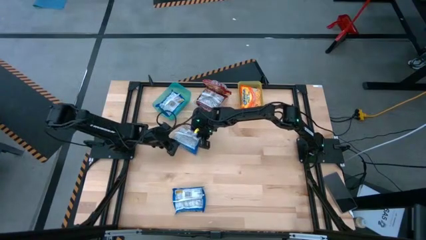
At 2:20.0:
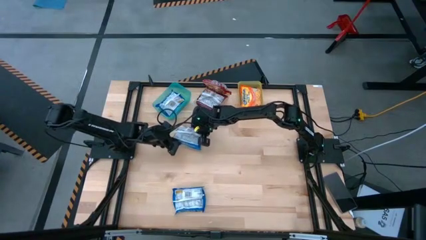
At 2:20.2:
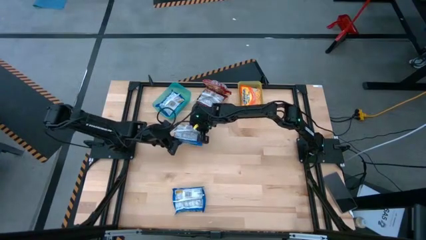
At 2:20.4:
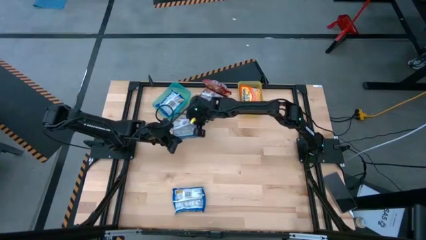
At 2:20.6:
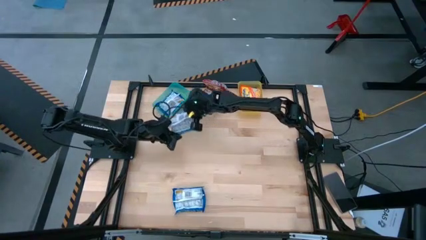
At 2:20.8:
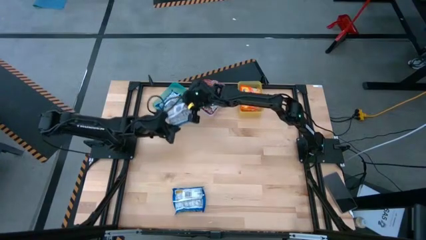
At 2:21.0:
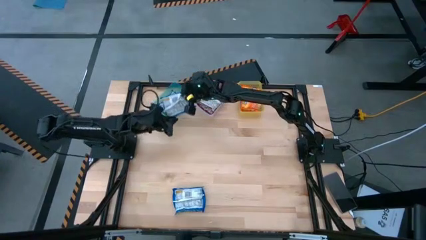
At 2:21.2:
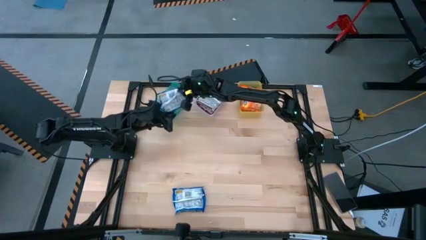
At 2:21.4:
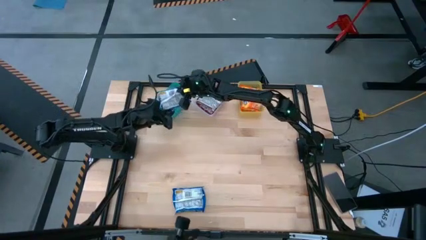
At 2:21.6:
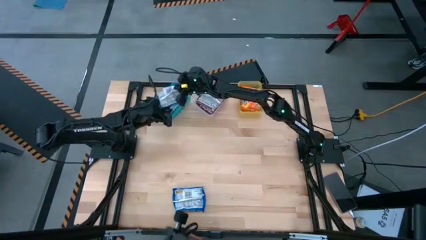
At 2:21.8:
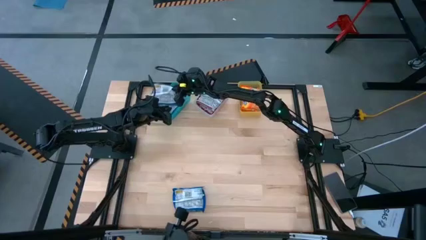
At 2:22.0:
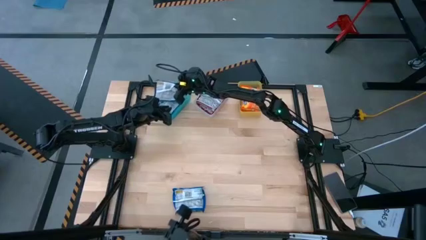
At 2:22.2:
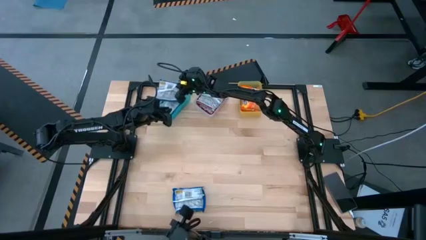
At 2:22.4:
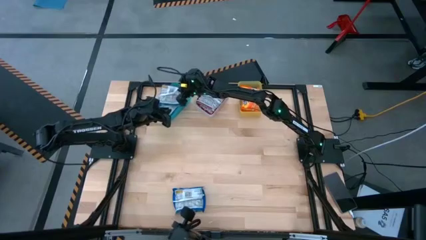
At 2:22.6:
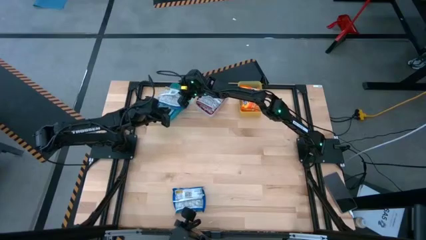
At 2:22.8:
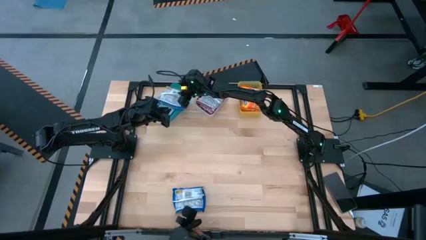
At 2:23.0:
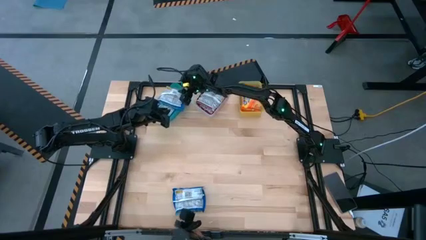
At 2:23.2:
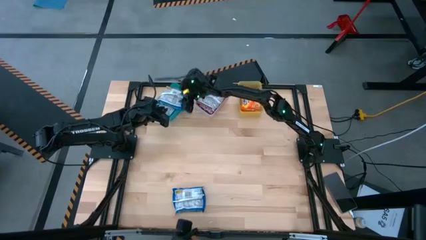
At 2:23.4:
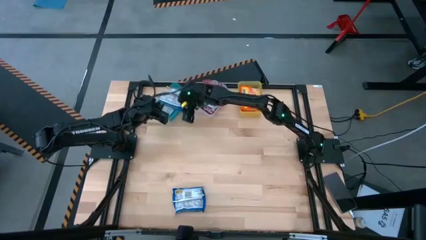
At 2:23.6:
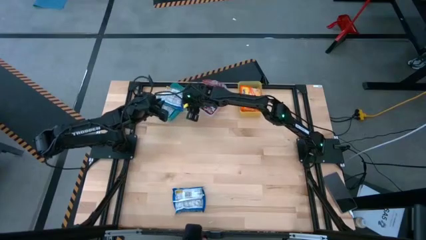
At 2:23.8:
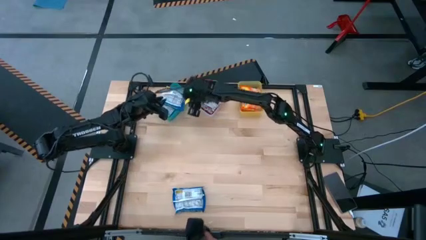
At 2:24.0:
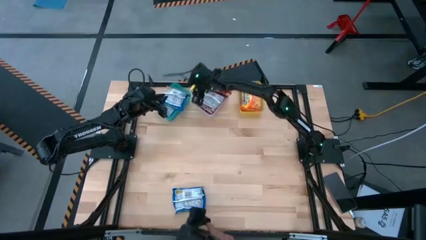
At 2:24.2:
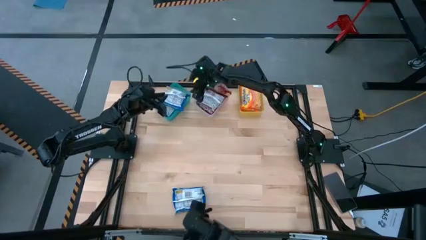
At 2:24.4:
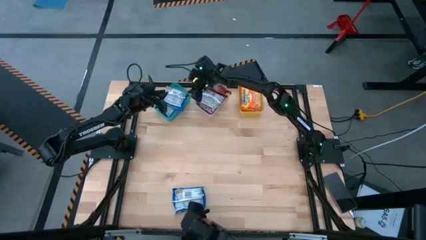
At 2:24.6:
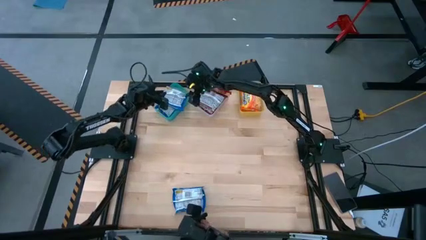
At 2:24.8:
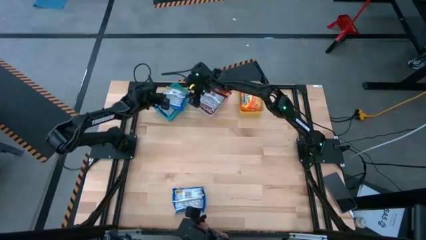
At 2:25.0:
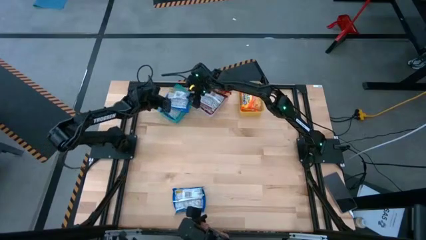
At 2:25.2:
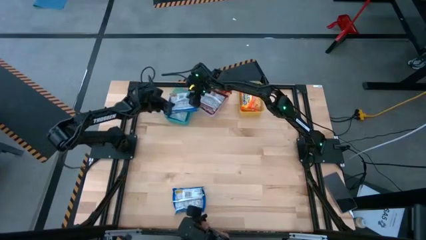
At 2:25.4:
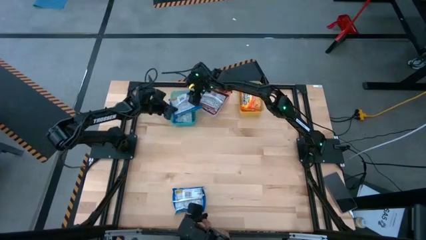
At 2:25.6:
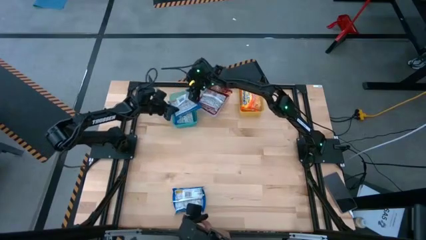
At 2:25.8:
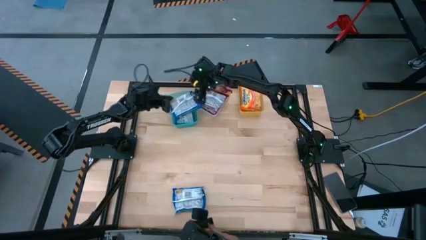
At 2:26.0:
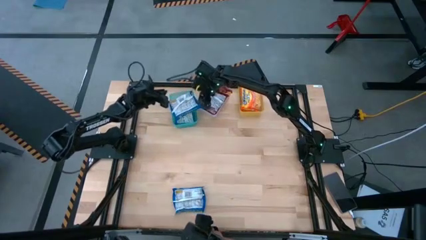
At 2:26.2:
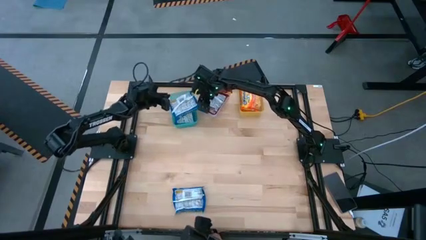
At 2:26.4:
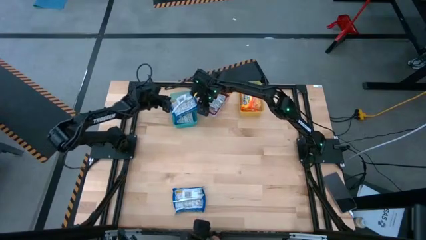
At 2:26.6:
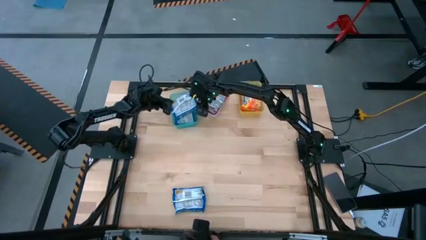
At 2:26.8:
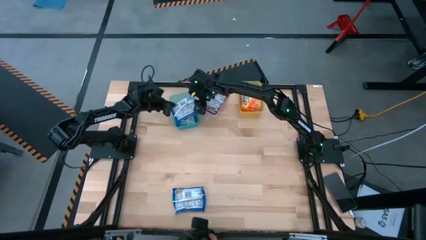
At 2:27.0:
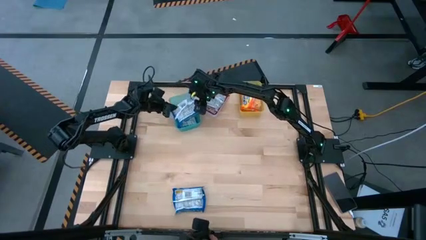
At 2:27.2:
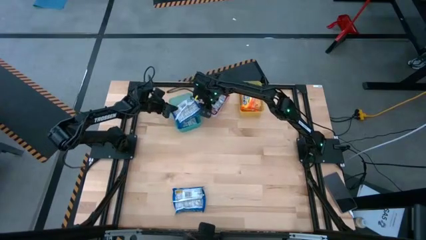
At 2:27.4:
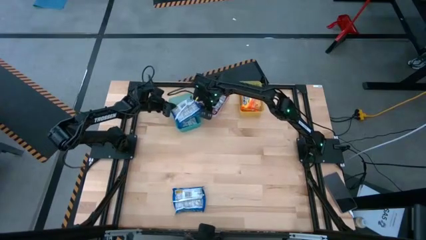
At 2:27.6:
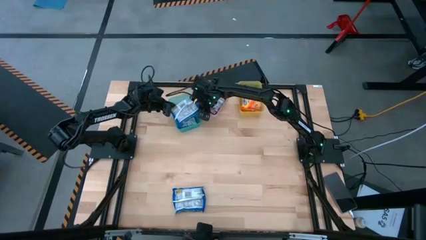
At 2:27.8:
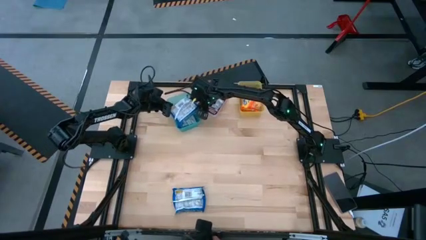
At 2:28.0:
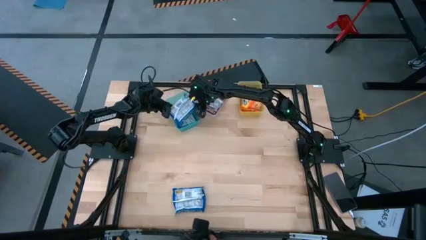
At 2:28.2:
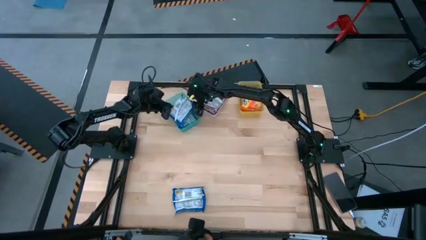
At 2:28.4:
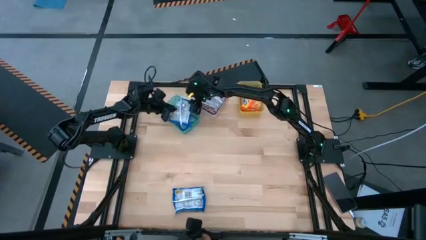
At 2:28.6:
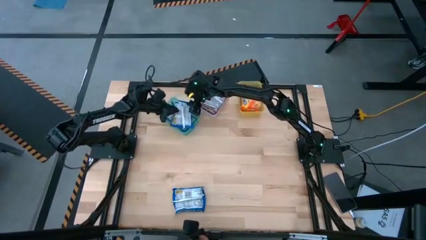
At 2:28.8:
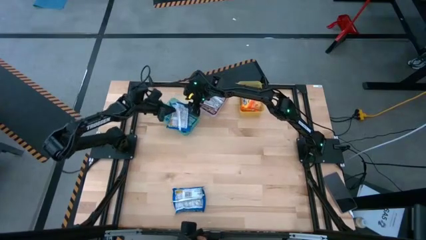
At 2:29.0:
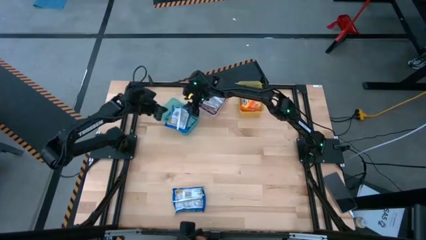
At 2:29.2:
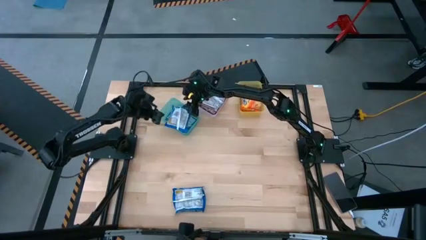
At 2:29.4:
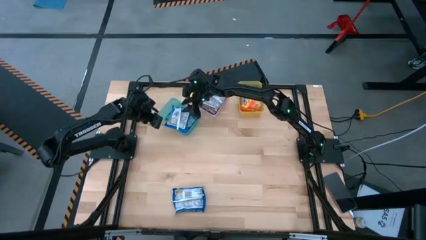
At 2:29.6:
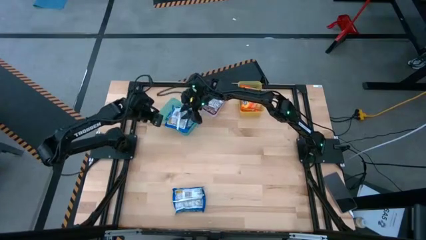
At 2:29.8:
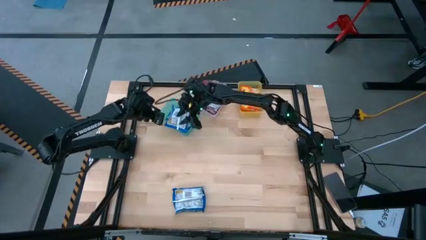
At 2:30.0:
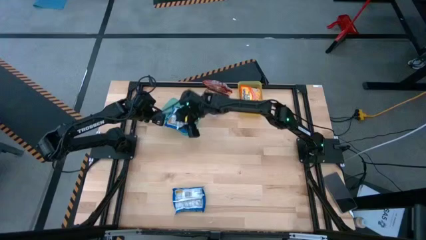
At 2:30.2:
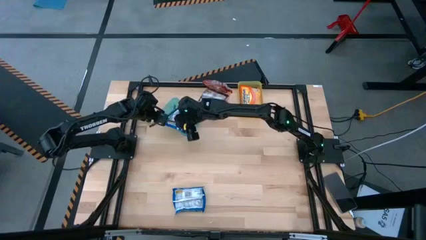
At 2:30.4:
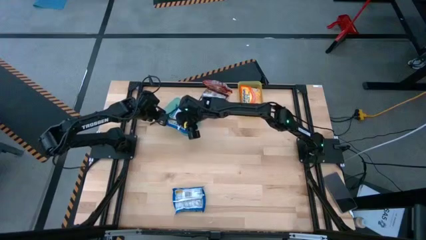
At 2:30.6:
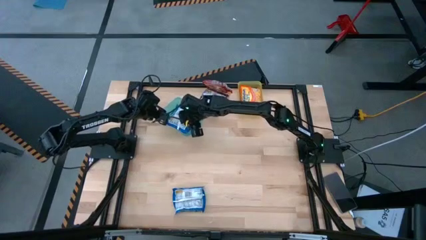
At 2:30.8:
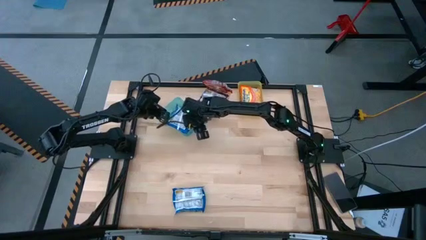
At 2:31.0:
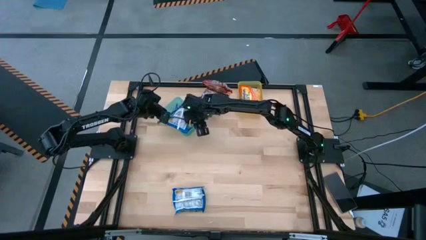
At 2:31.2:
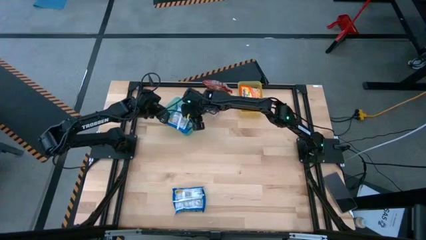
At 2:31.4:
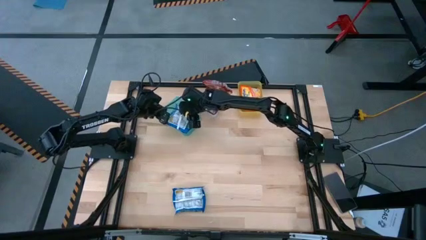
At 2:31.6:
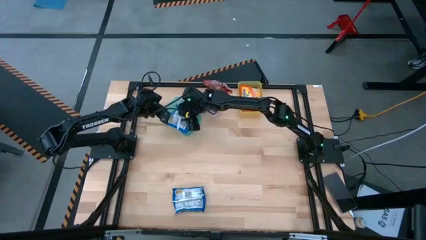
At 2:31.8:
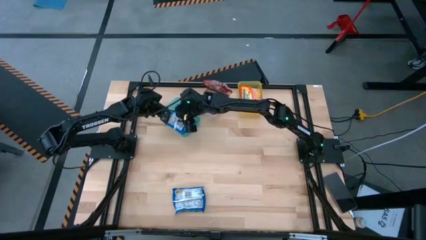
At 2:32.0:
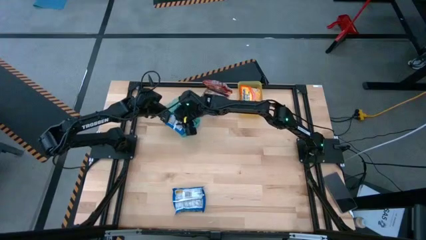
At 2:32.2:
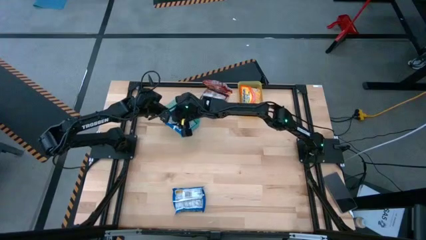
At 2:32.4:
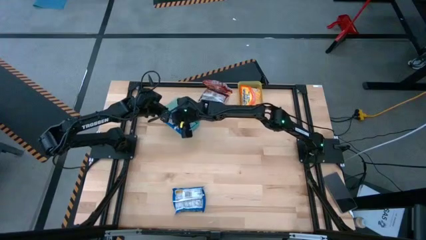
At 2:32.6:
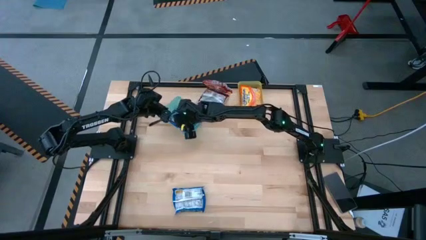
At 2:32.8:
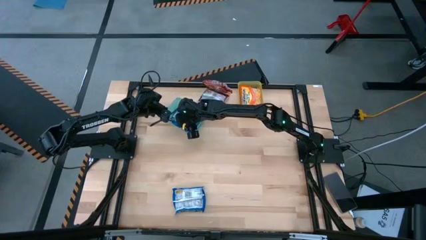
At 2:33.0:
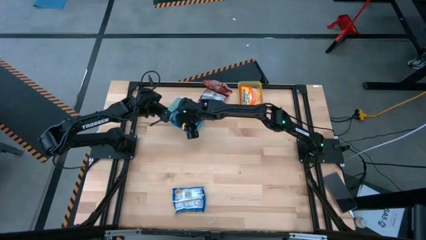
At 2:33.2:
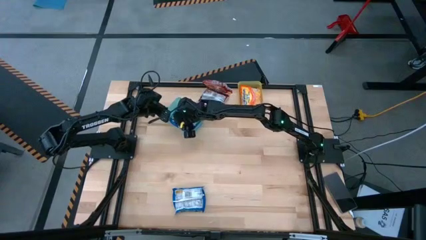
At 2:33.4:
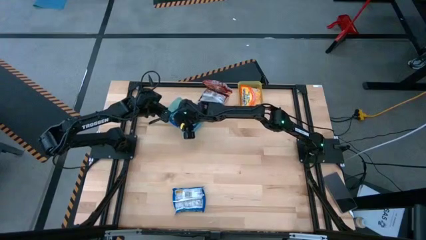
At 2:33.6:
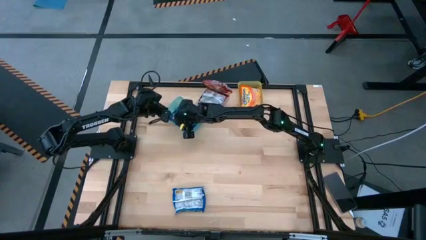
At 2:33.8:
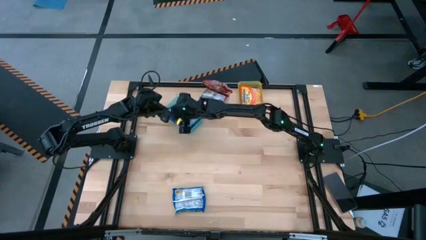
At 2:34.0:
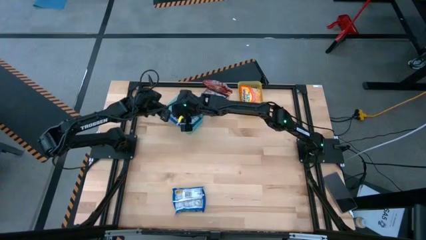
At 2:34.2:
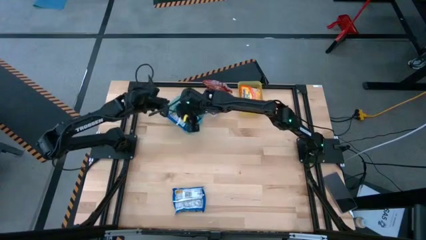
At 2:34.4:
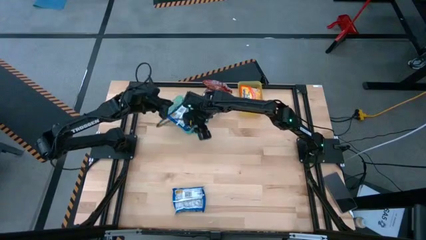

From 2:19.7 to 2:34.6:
Task: Sort Maruchan noodles
Put the top blue noodle pack into the blue bin

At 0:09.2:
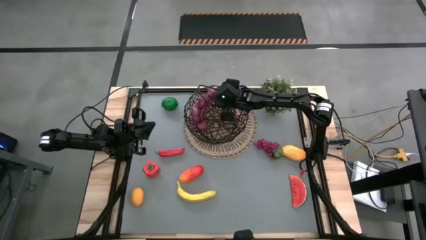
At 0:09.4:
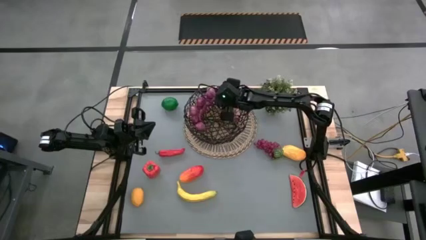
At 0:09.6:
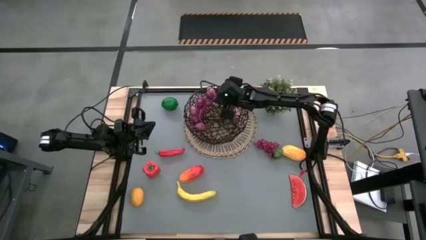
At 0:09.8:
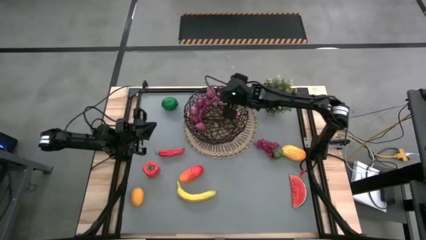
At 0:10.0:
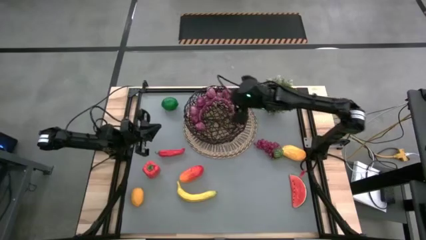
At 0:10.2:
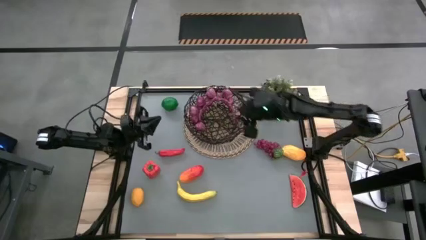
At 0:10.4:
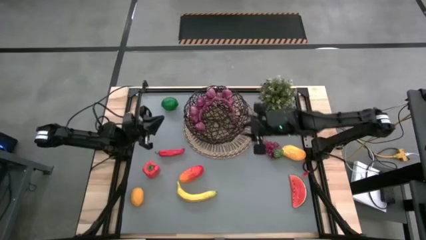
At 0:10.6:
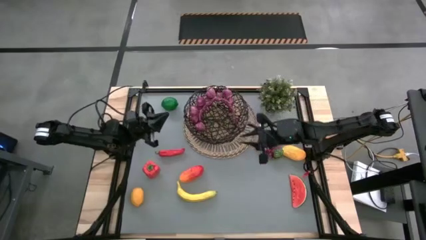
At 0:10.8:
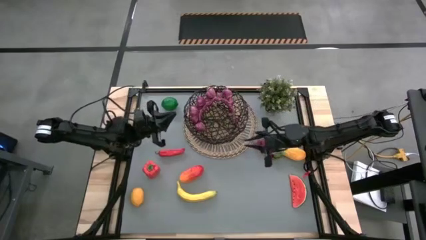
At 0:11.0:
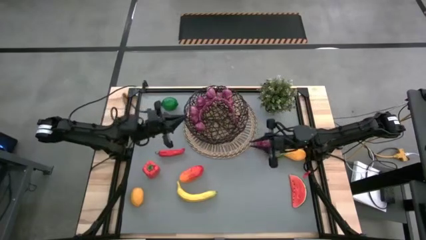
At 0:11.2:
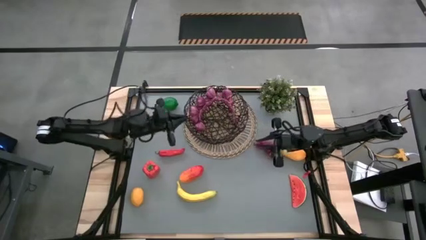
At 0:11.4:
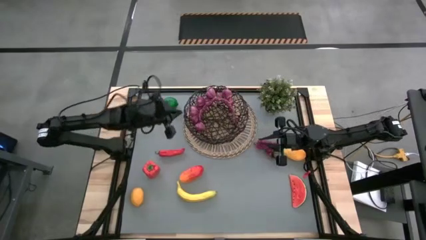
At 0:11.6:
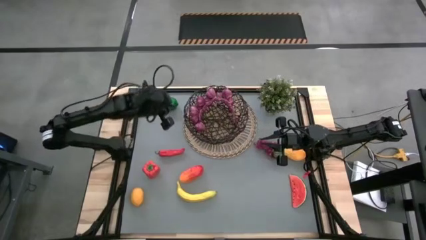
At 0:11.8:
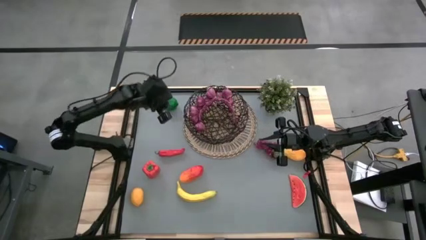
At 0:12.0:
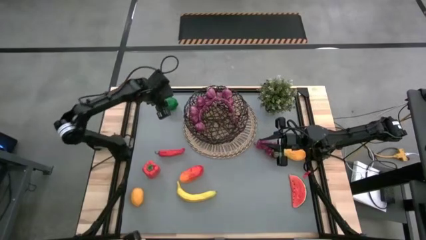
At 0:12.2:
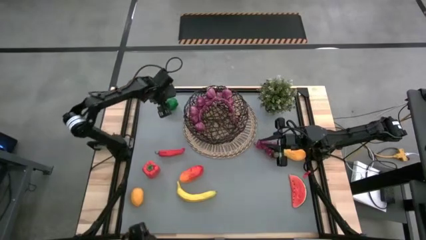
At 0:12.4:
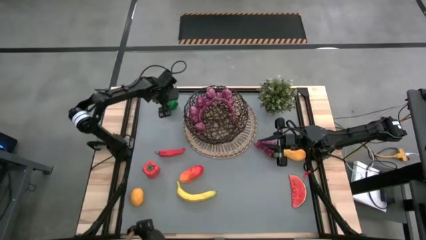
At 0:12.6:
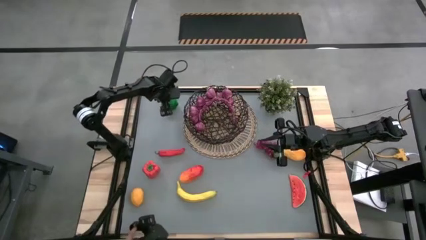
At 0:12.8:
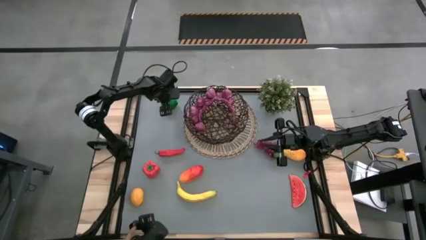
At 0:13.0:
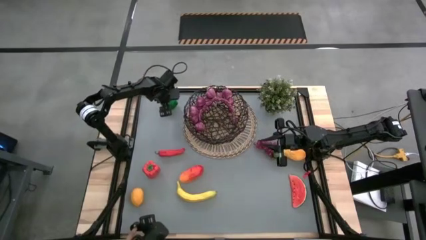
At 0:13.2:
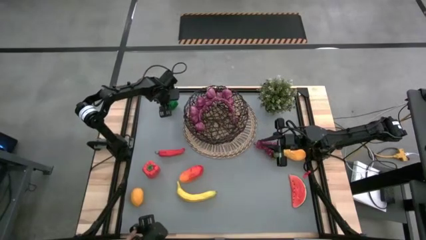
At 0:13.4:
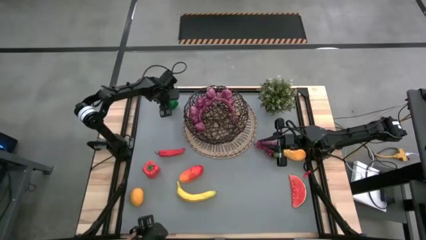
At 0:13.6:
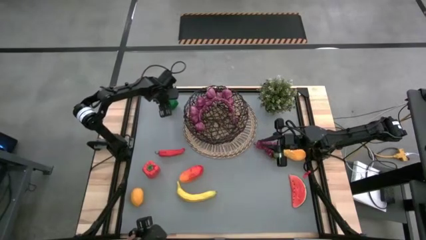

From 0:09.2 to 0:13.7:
Task: Build produce basket
Put the green lime into the basket
